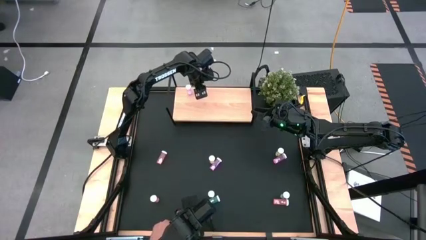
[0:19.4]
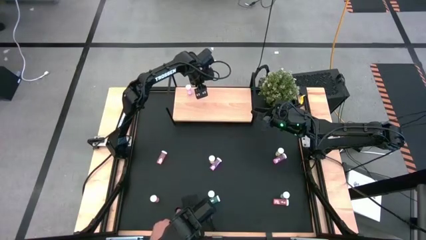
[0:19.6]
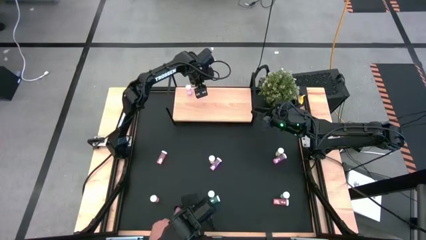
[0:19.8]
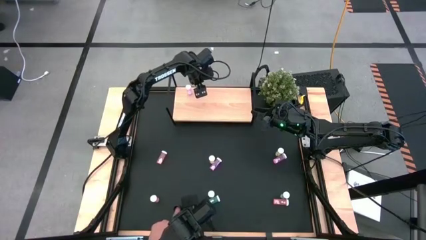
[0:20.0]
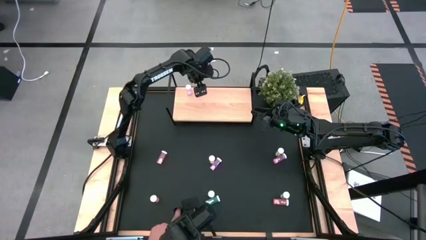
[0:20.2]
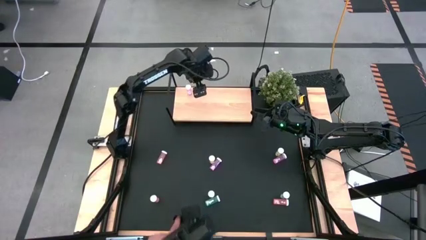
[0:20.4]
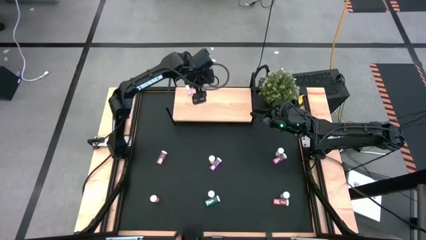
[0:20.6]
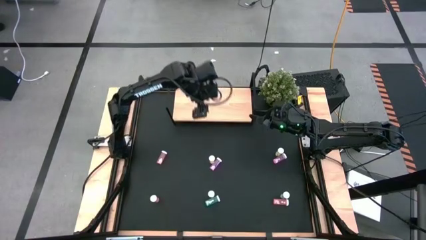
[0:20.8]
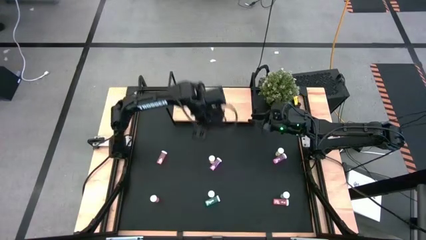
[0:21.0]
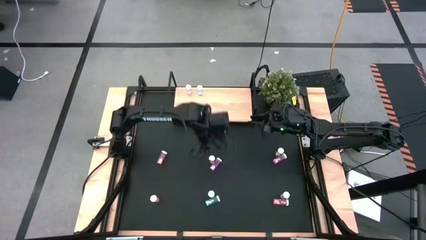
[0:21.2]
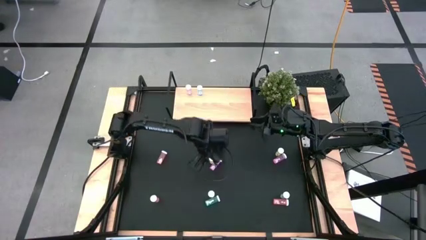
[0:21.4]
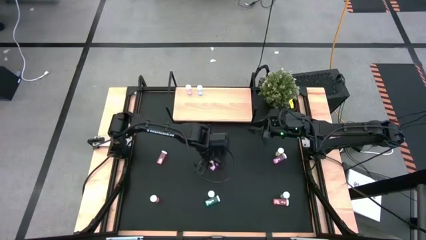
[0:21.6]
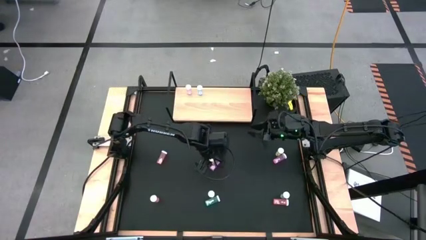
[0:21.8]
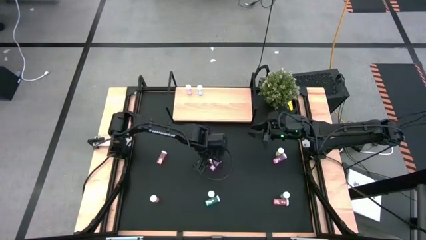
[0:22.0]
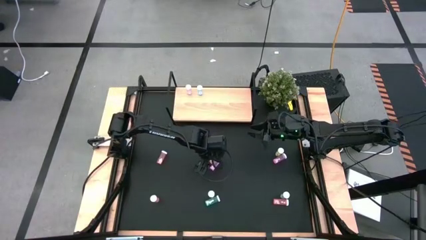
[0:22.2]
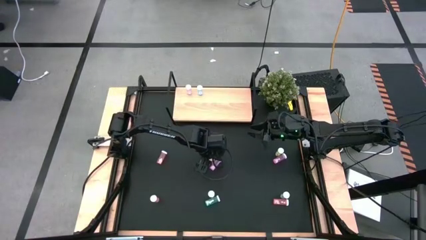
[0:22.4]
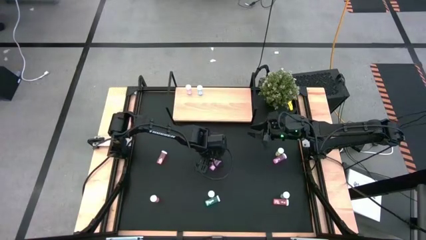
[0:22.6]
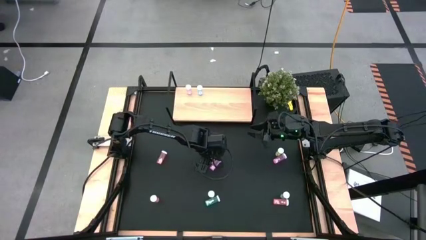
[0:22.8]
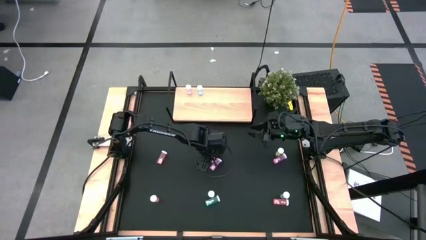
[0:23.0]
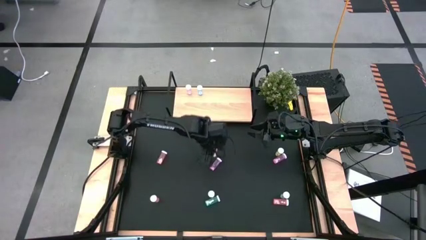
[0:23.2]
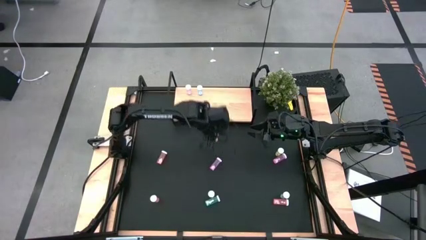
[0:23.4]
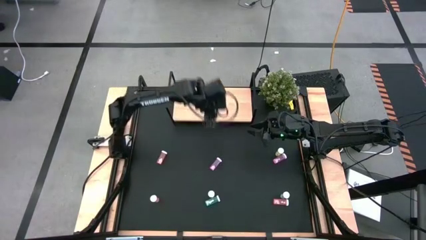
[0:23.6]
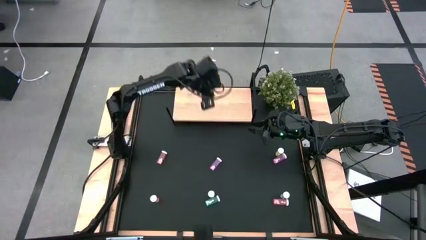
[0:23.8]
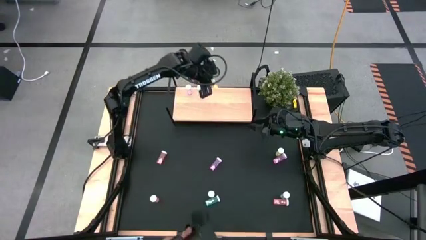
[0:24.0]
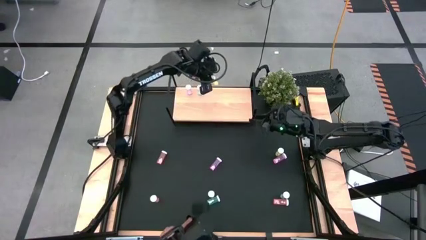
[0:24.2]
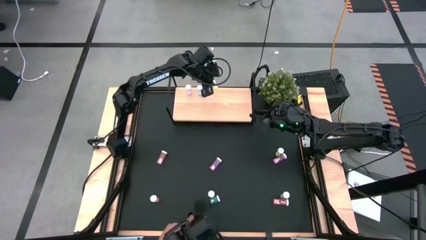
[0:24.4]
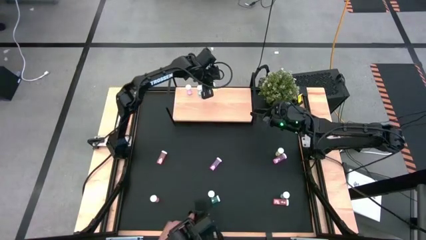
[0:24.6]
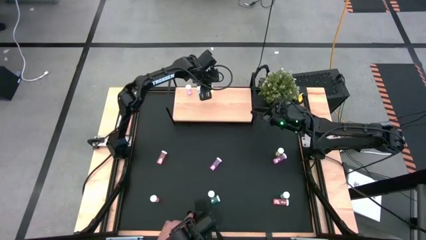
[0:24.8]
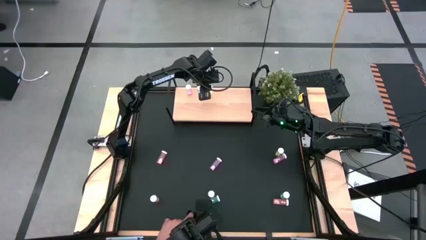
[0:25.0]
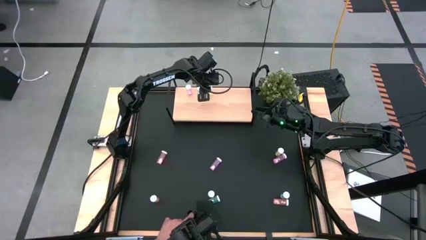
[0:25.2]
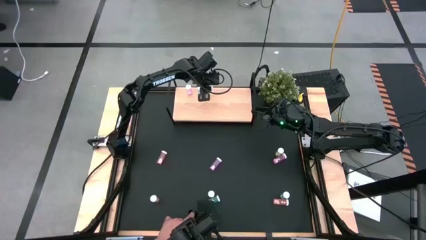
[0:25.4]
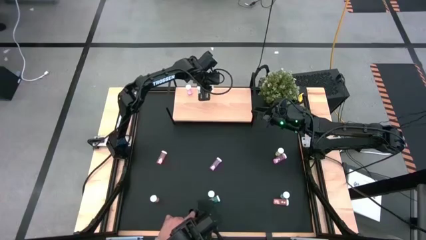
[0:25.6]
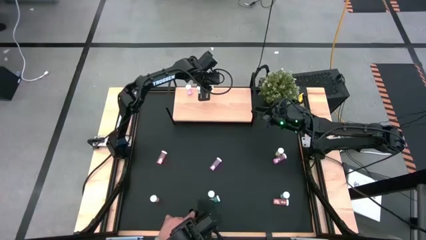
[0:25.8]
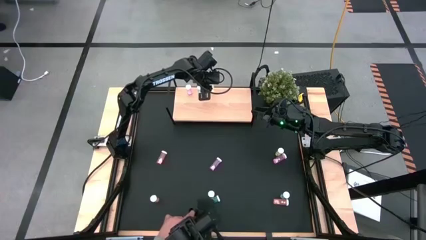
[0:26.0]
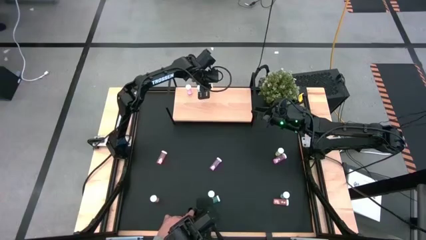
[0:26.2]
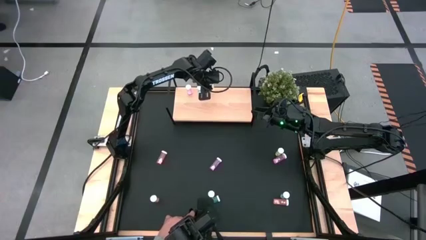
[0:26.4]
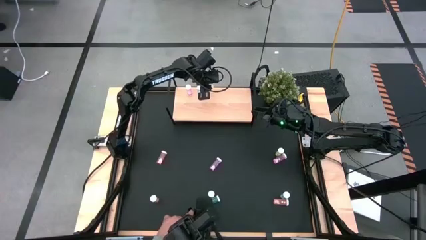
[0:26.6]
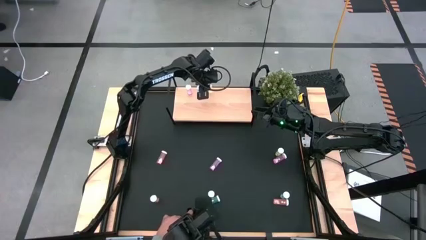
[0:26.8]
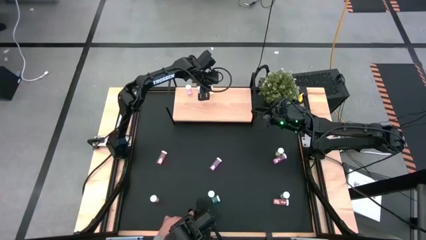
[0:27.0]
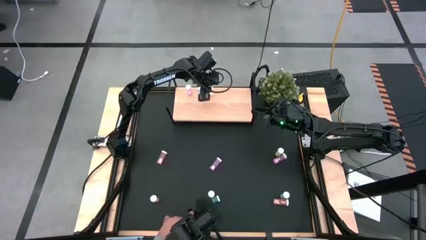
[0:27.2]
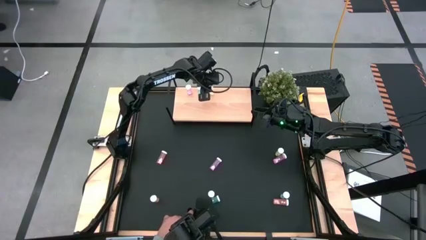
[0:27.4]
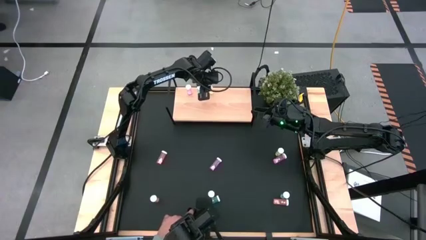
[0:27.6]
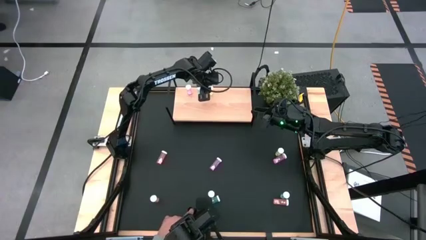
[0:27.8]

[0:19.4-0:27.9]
Task: Pick and place medicine bottles onto shelf by color
Put the top left yellow medicine bottle on the shelf

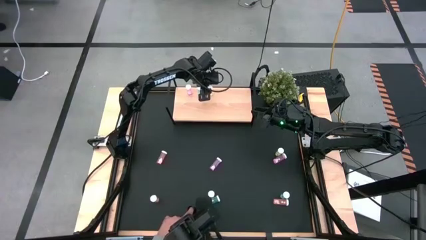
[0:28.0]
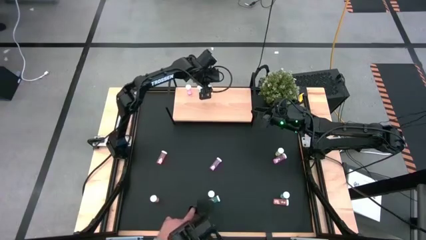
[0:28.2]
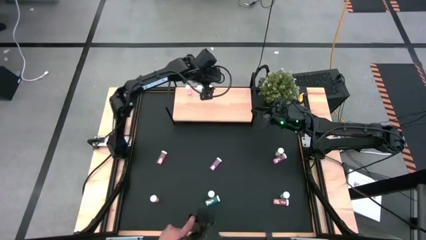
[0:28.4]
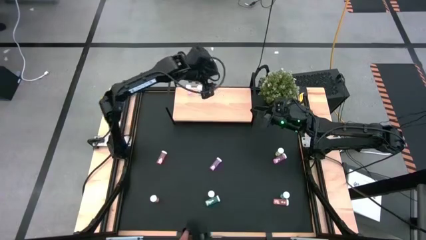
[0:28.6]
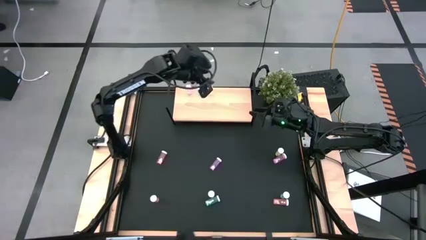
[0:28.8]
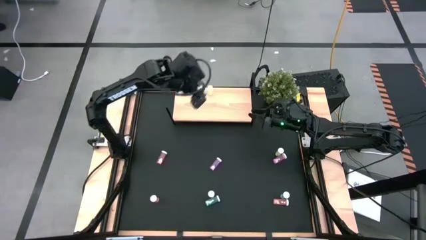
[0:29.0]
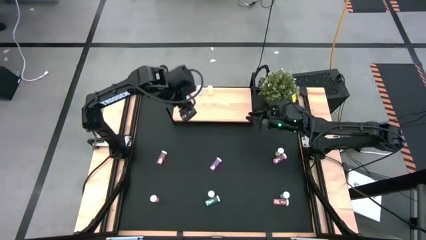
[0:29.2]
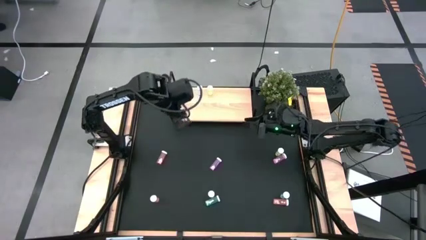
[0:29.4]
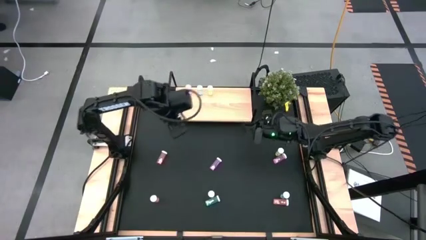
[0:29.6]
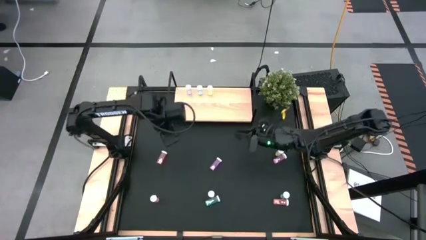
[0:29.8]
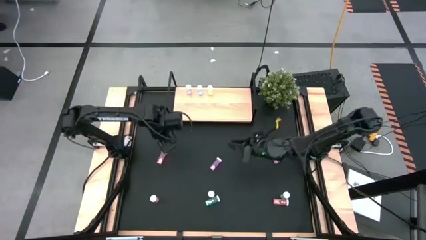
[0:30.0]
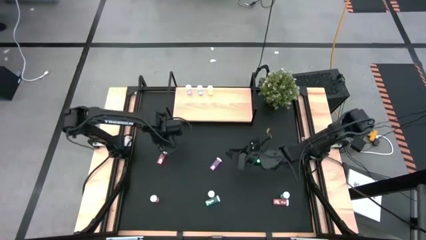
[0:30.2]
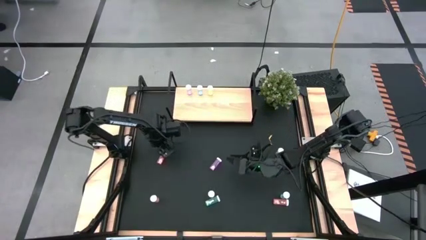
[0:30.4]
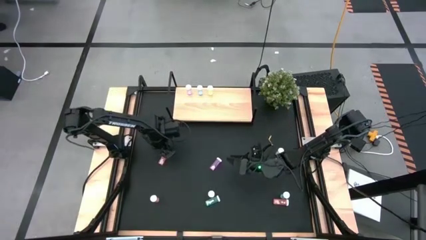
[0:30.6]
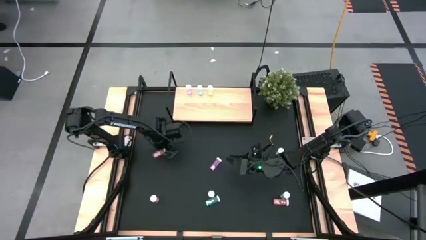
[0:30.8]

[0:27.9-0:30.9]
Put the top left red medicine bottle on the shelf

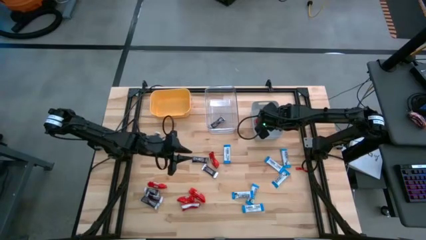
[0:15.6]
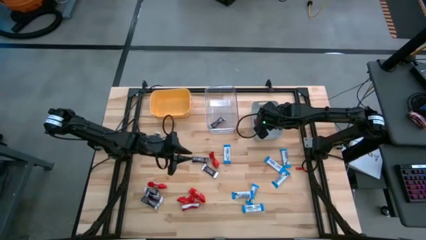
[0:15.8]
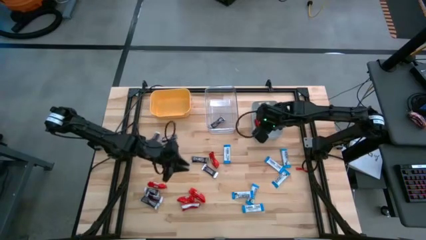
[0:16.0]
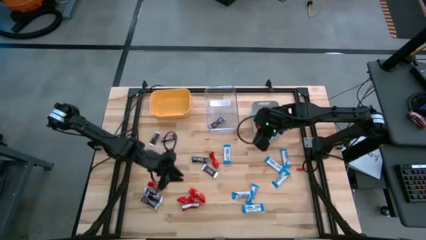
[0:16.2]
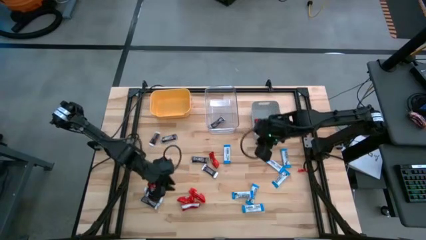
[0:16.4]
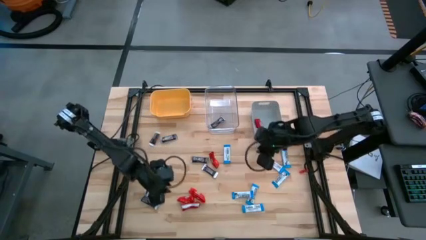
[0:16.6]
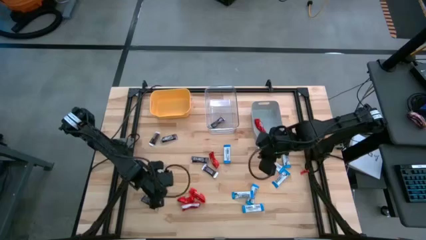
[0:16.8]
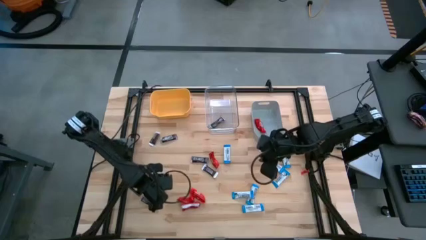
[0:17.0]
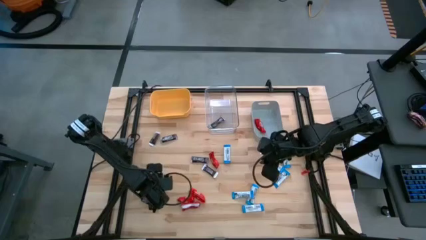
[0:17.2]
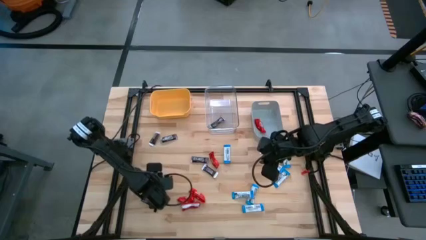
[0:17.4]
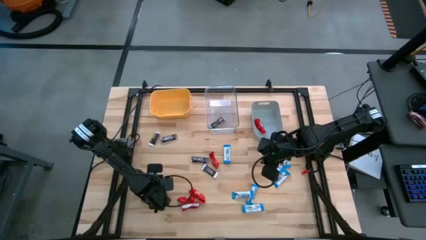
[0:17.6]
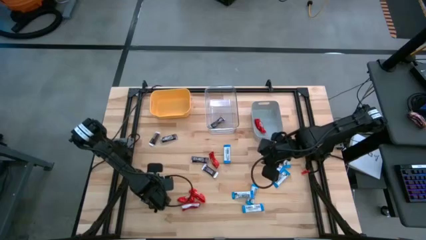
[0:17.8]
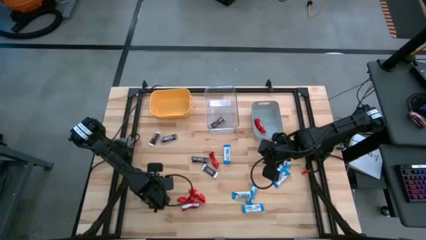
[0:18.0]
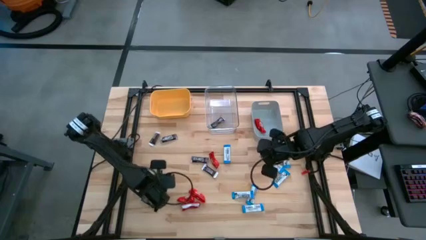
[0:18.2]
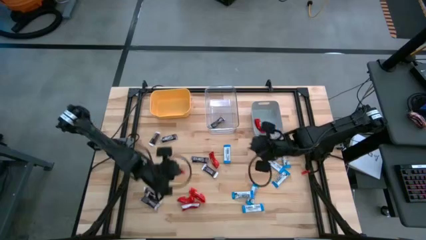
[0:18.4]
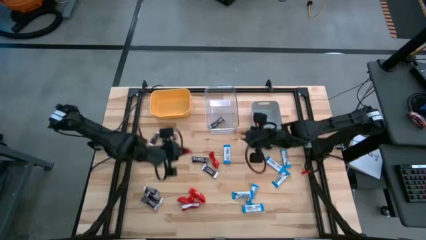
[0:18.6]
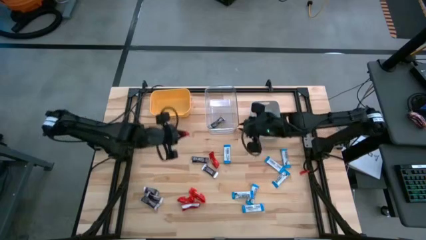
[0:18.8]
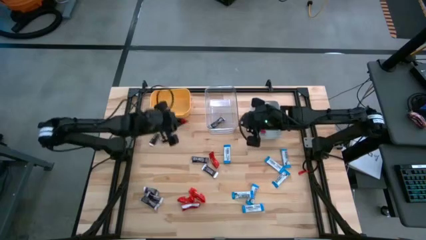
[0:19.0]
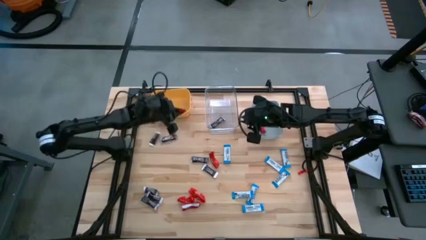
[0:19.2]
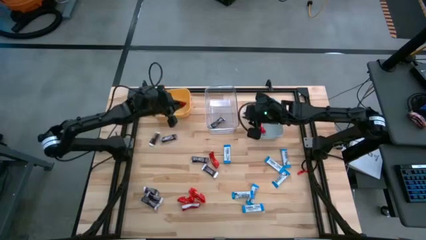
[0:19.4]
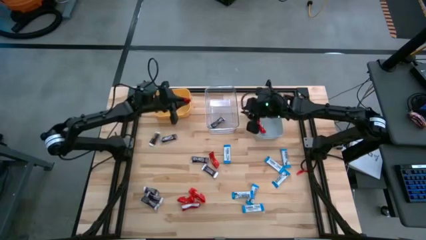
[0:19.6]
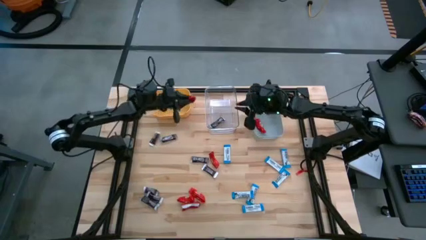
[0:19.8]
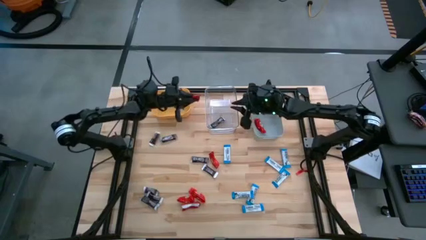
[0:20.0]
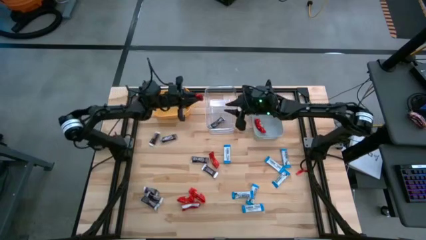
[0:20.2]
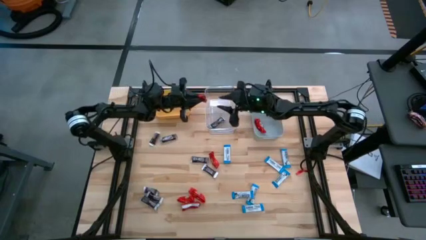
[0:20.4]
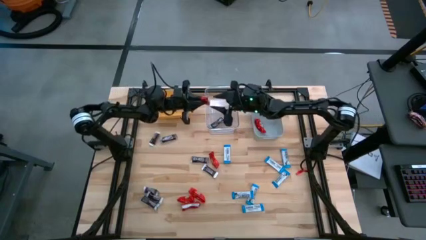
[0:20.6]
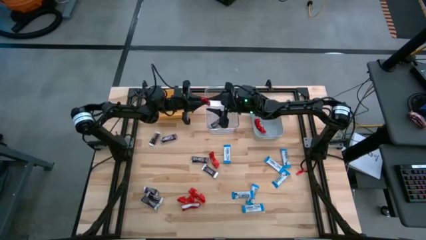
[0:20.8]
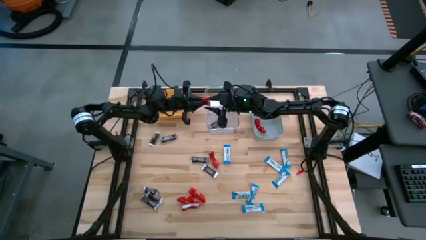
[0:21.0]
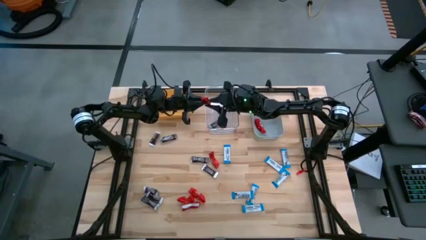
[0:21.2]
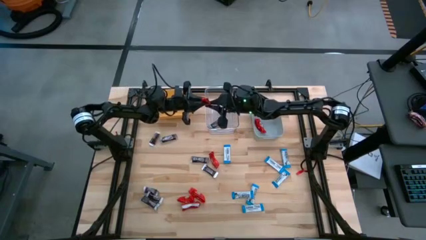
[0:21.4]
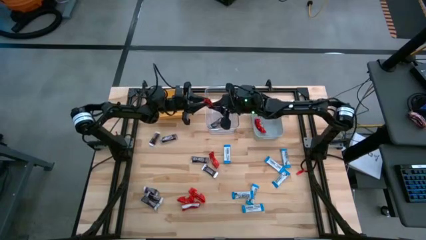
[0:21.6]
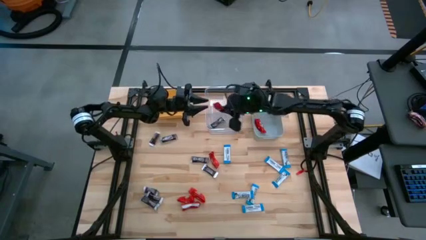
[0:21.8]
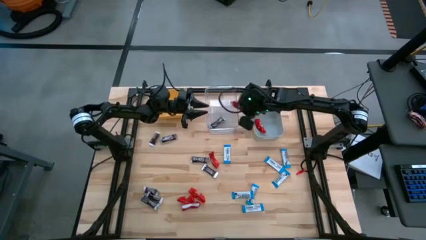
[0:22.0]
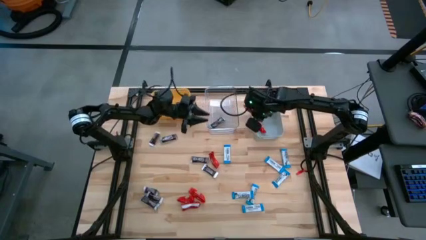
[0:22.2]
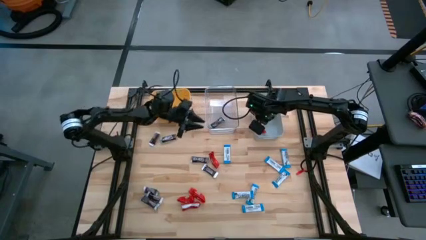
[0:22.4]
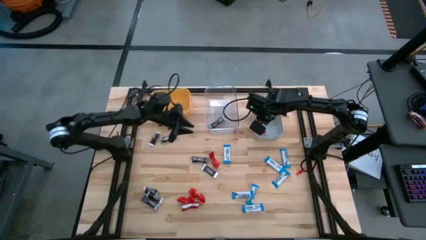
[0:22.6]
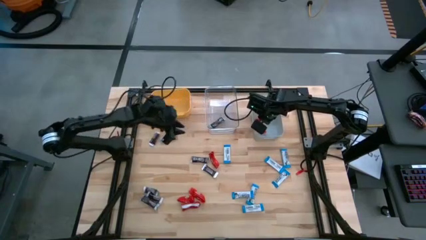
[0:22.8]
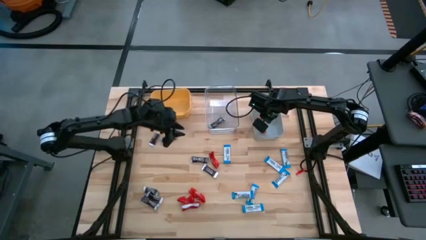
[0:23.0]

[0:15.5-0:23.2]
Task: Sort candy
Put the red chocolate into the gray bin
